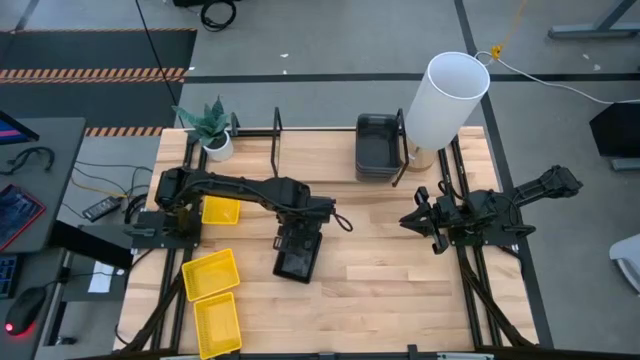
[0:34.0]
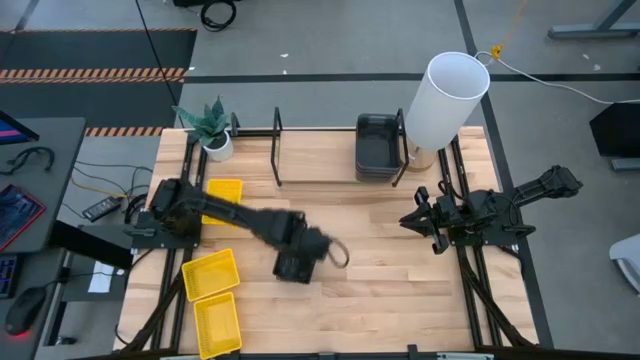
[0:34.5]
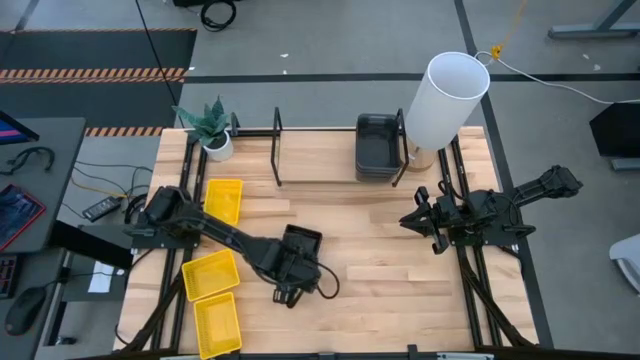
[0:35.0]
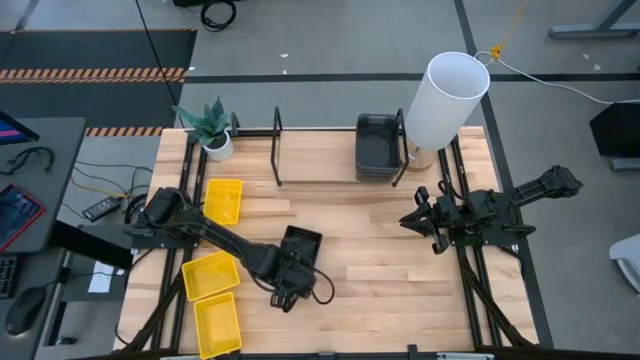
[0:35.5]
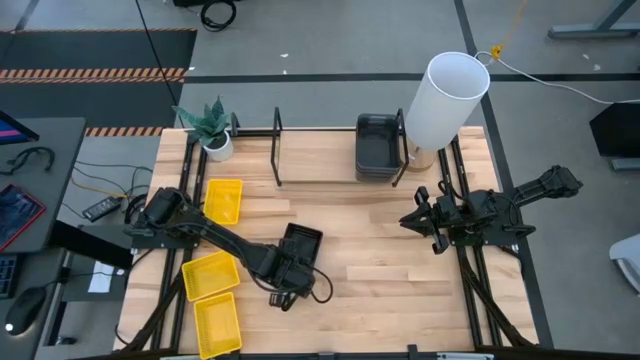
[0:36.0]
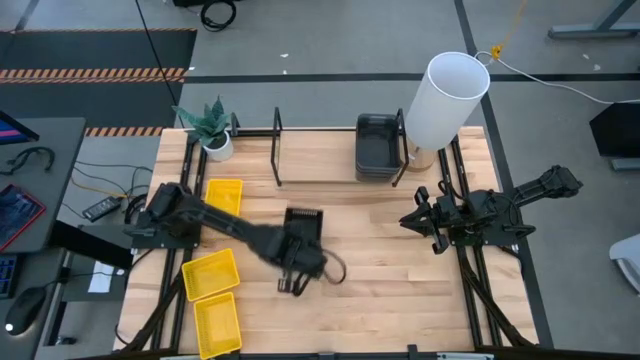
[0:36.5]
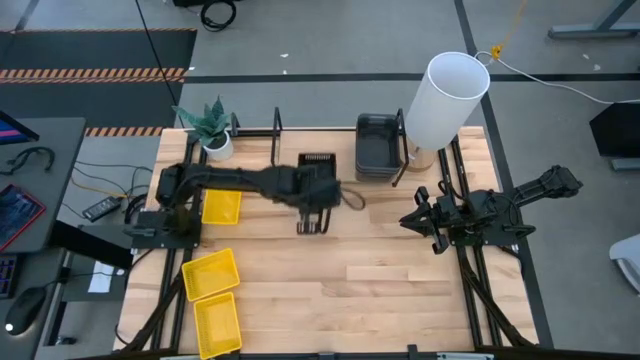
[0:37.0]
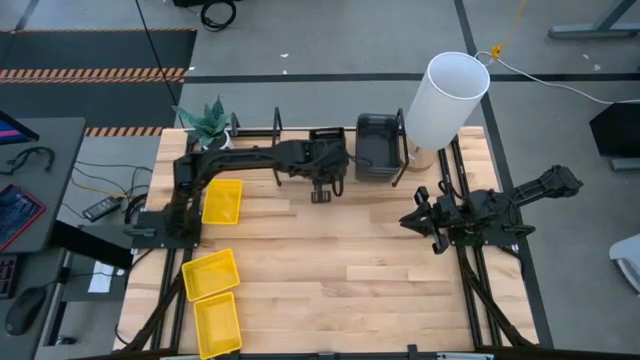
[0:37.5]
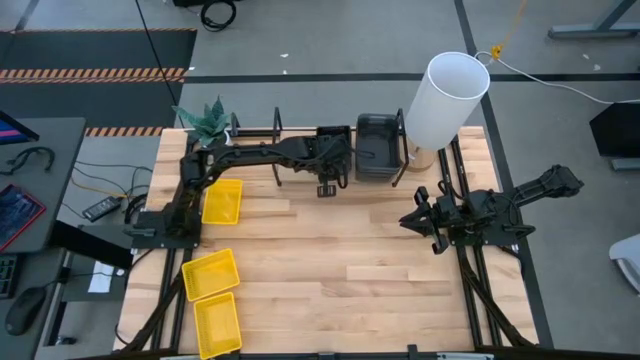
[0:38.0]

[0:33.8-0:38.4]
Task: Stack baskets on shelf by color
Put the stacked black bins on the shelf

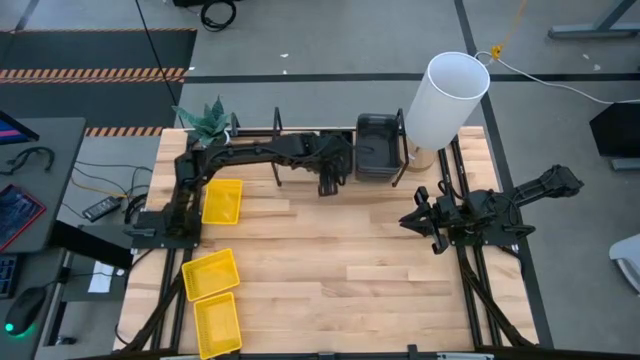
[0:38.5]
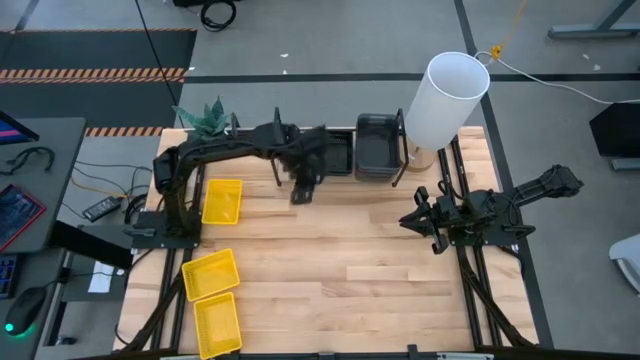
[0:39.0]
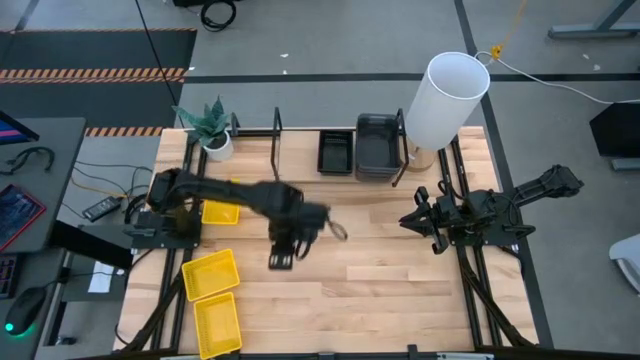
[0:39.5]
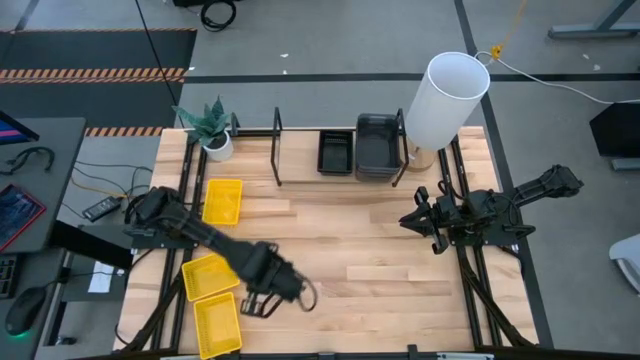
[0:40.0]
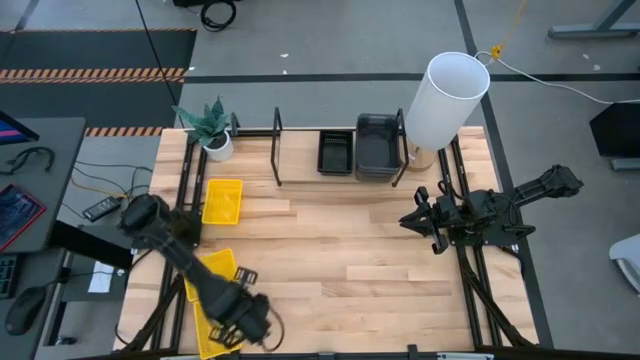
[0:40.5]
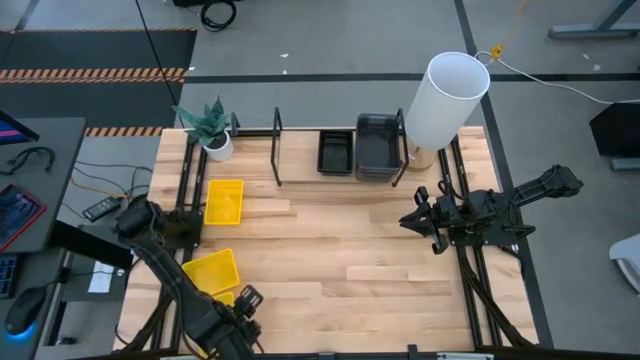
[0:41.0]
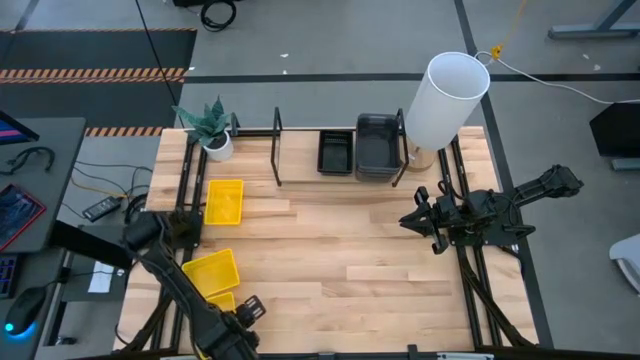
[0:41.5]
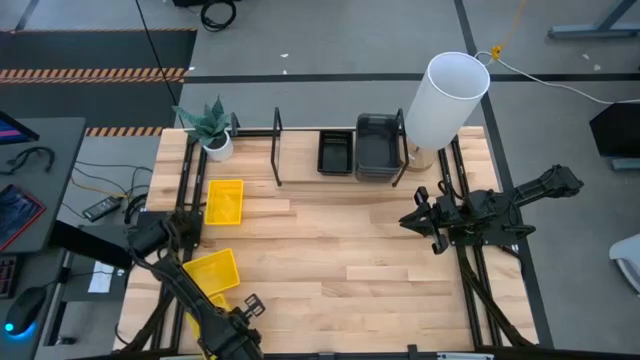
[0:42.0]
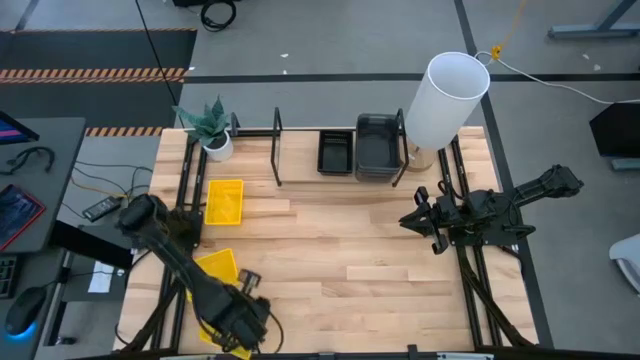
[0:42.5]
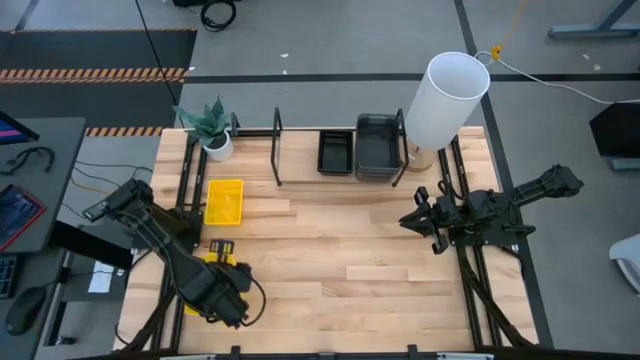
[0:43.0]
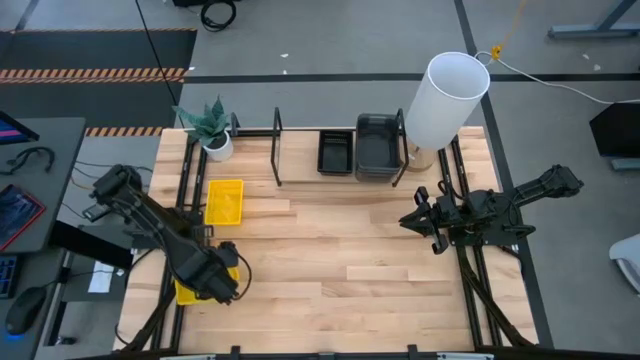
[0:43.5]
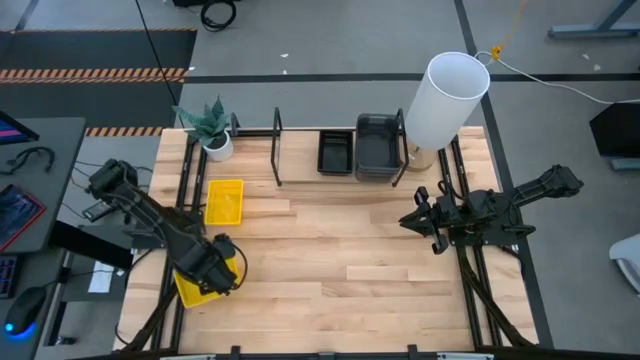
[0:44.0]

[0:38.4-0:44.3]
Stack the bottom yellow bin on top of the middle yellow bin

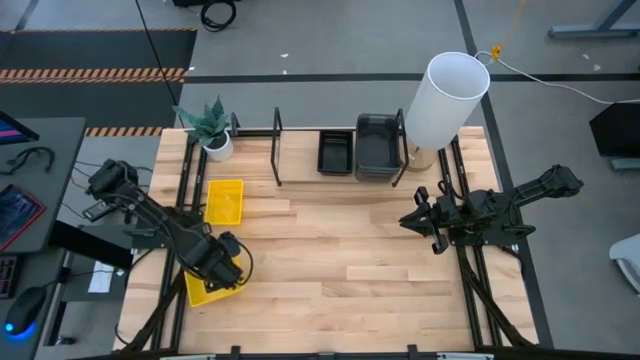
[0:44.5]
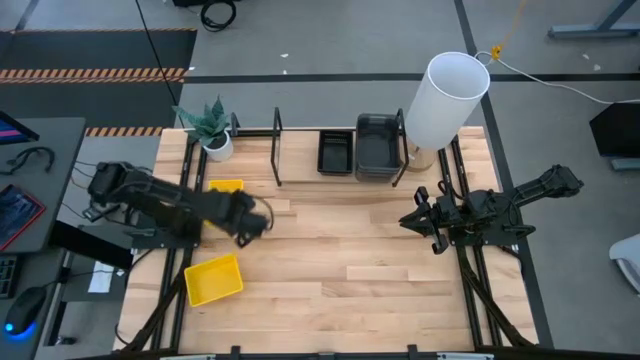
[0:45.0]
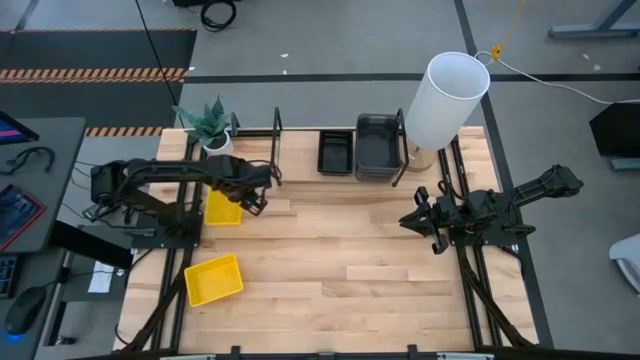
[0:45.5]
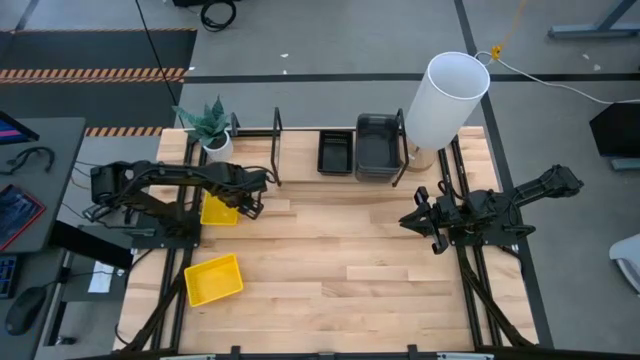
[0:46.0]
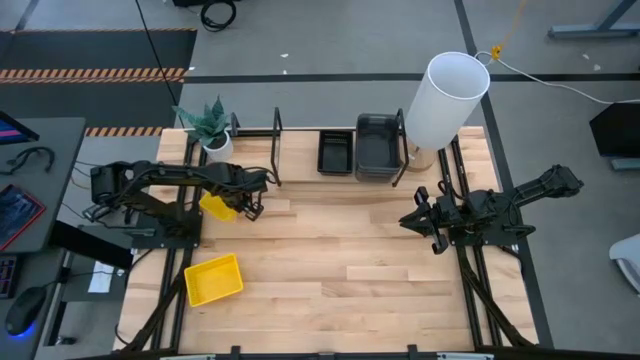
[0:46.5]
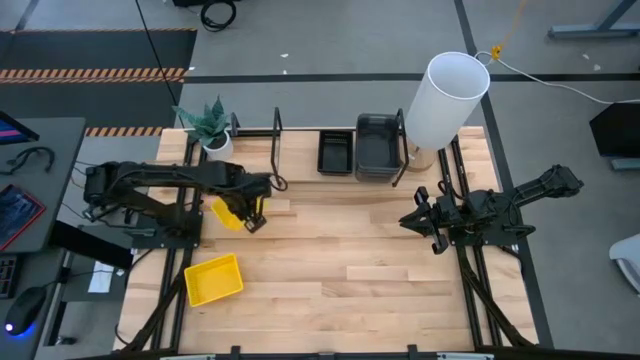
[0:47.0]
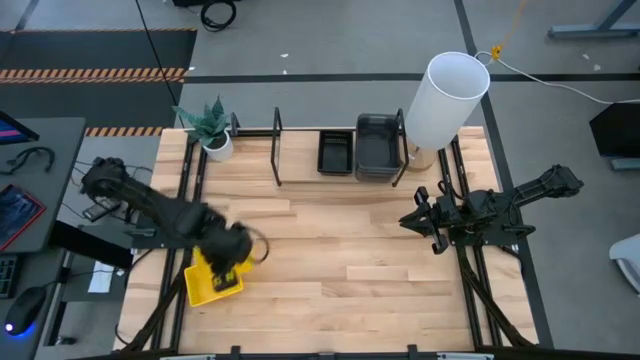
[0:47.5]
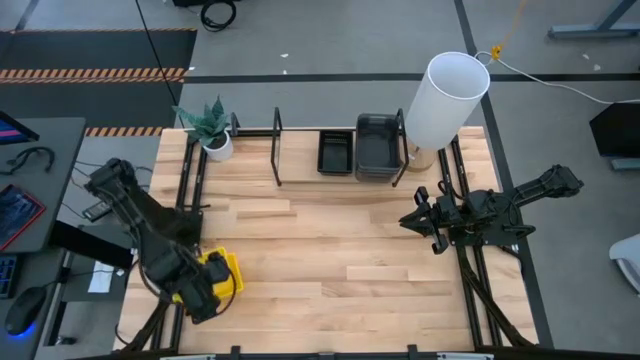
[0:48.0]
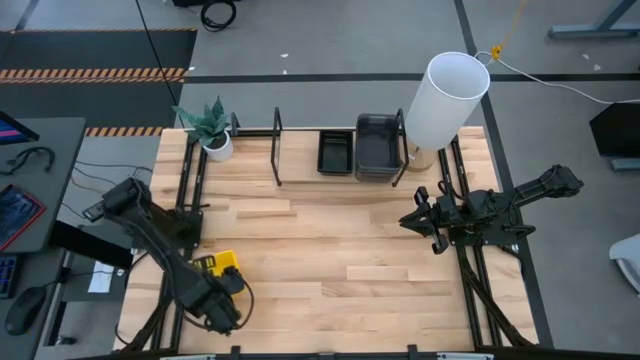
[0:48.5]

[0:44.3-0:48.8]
Stack the top yellow bin on top of the bottom yellow stacked bins

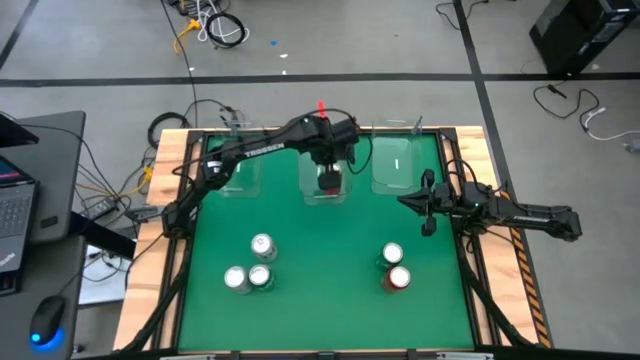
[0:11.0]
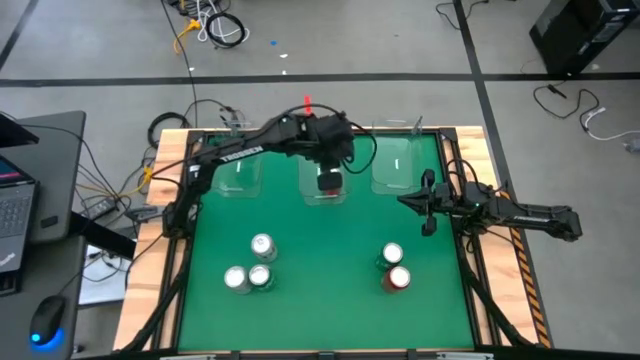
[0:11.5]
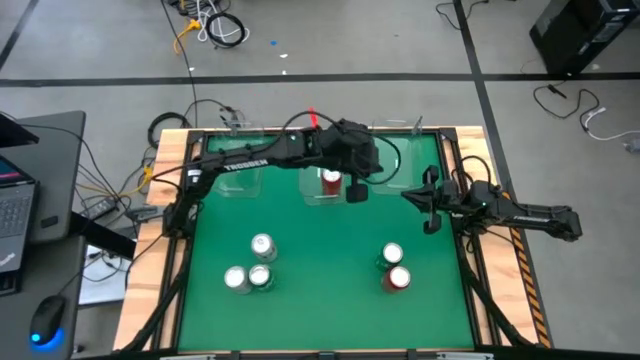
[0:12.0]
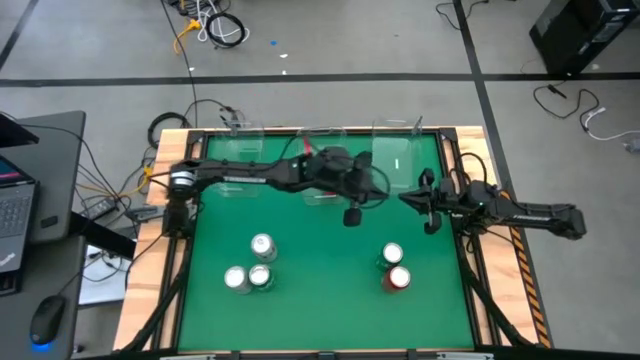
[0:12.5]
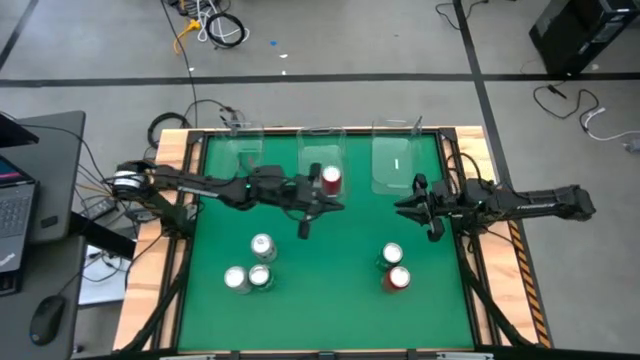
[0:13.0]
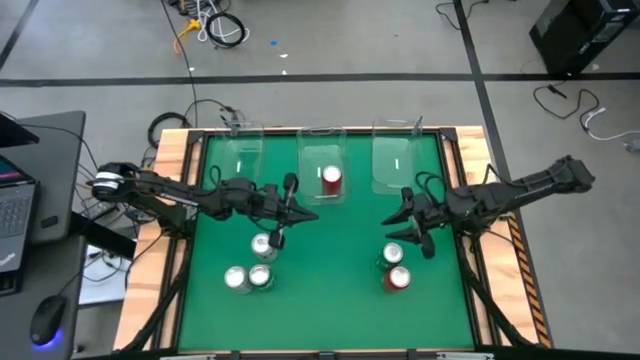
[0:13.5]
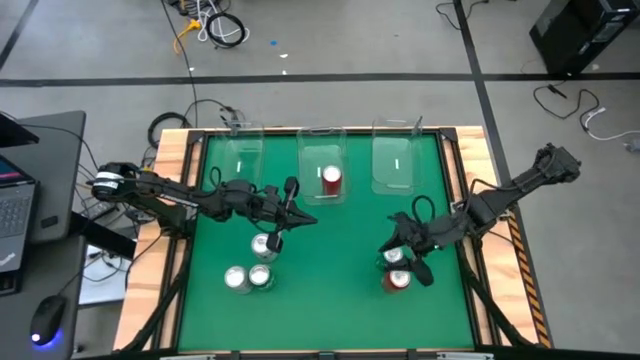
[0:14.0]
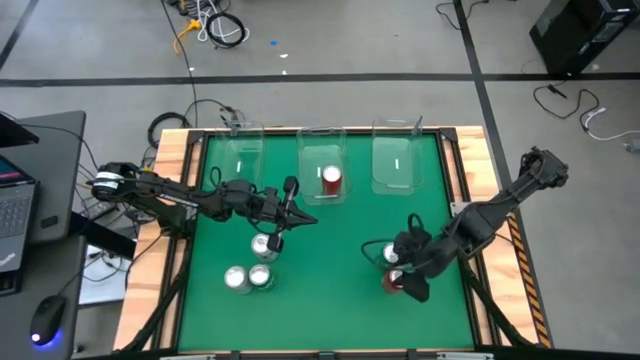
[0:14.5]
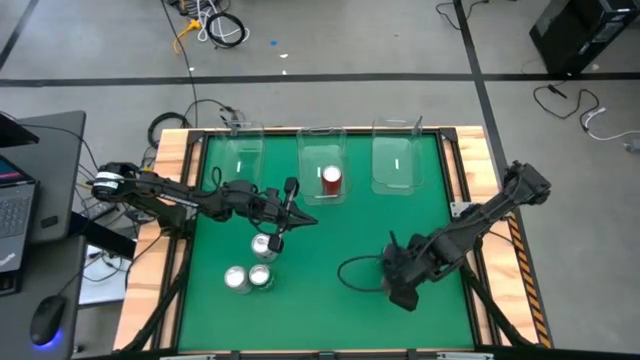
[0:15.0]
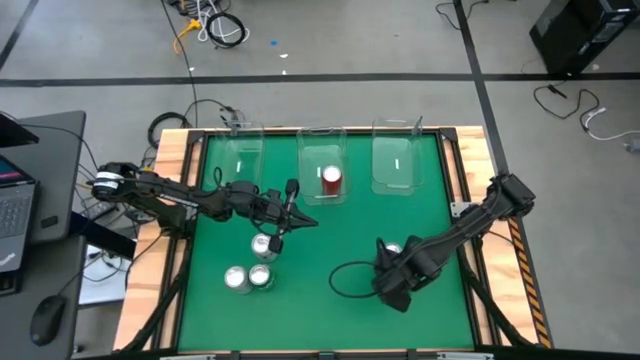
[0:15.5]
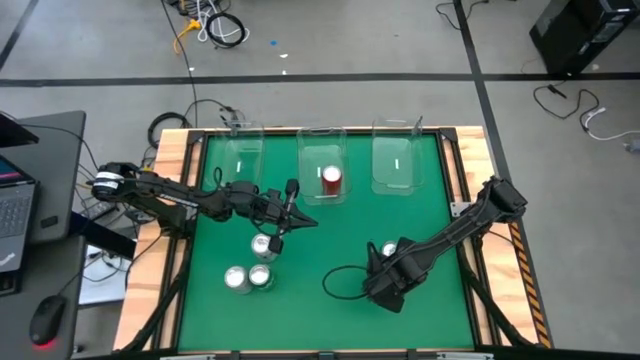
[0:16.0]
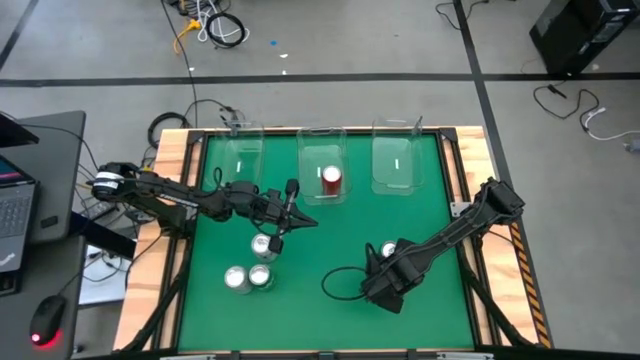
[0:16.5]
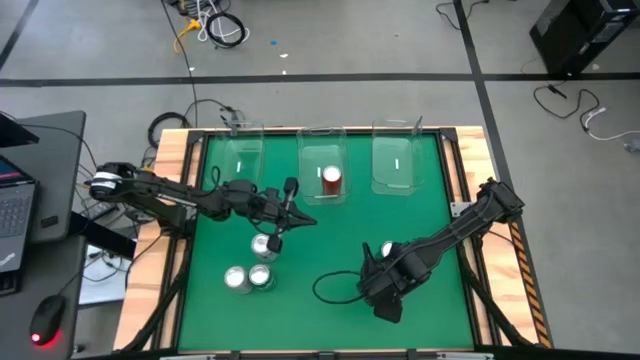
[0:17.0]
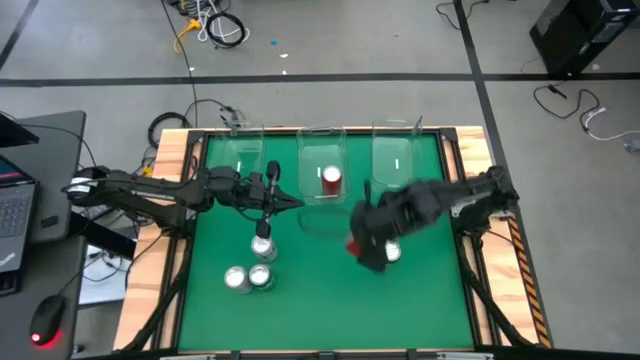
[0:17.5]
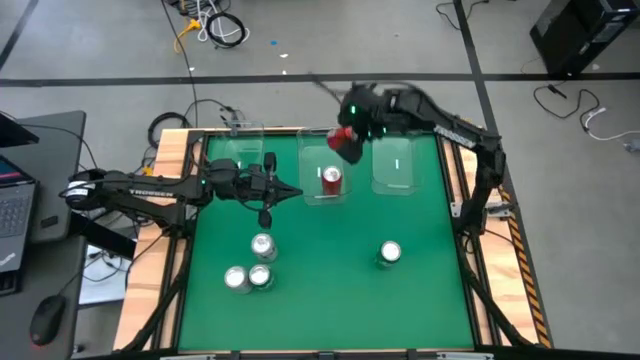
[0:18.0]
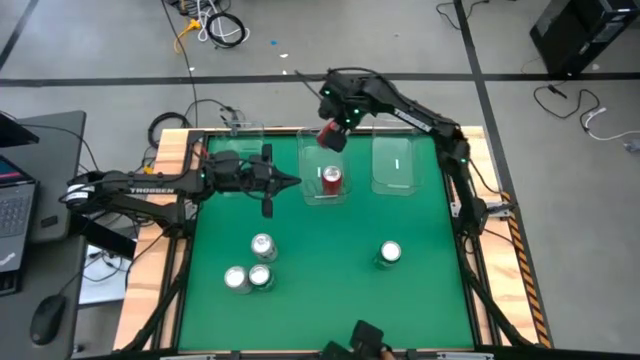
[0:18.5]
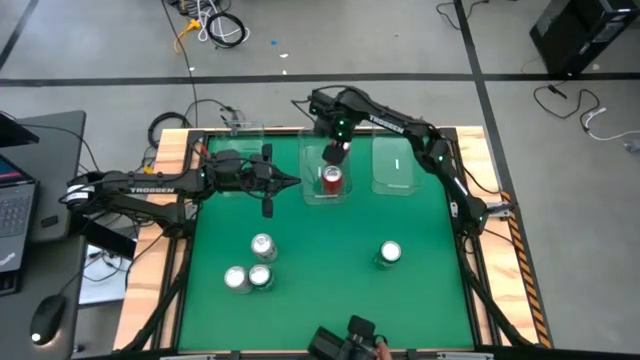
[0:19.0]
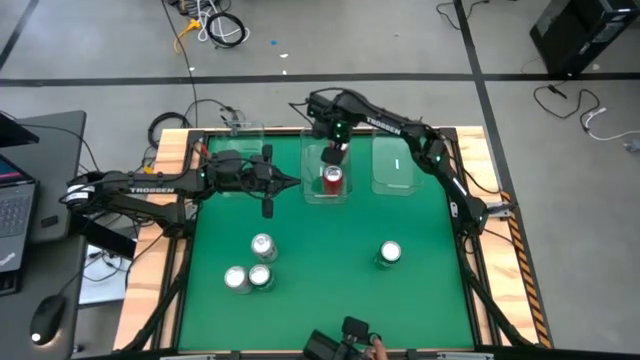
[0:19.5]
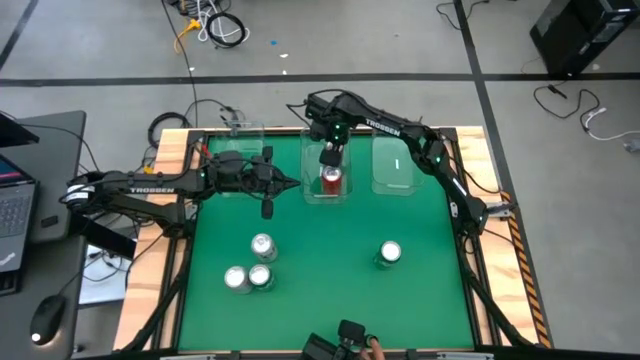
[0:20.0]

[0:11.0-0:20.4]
Task: Sort soda cans
Put the red-black soda can into the center transparent bin
